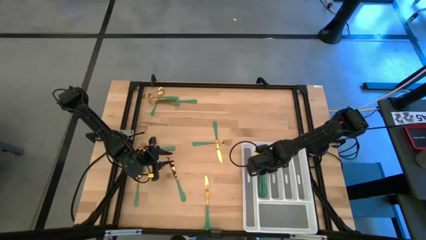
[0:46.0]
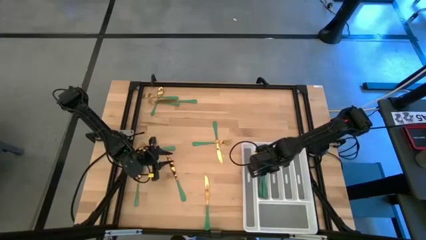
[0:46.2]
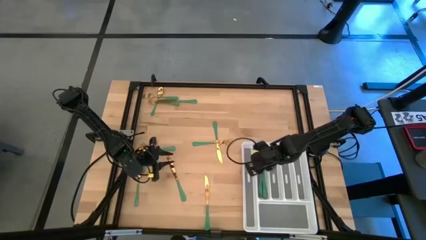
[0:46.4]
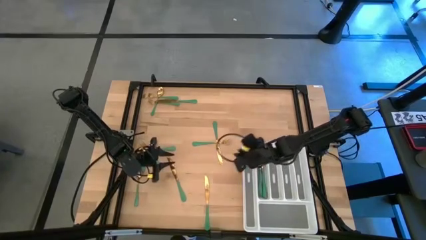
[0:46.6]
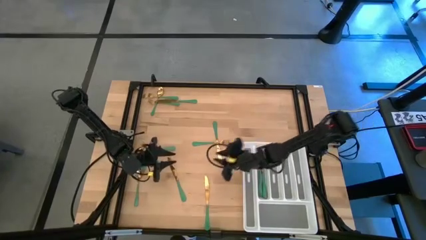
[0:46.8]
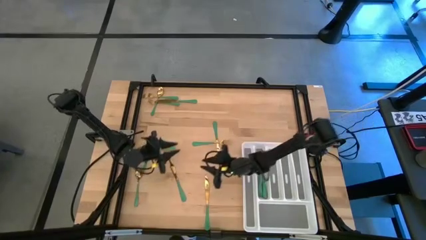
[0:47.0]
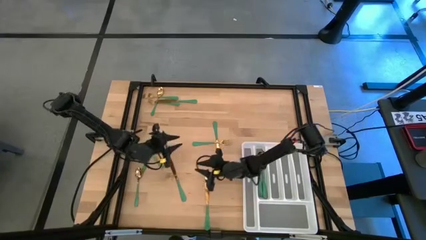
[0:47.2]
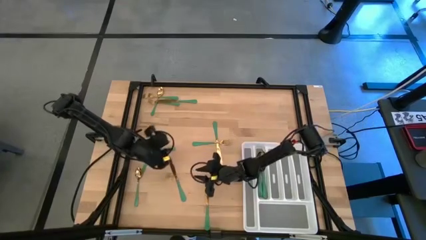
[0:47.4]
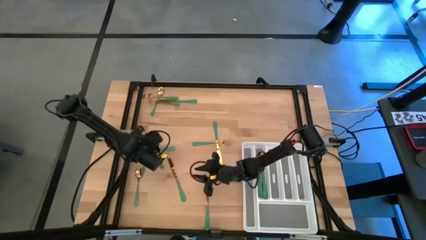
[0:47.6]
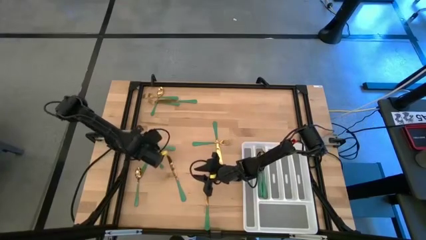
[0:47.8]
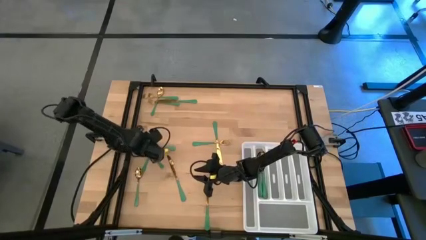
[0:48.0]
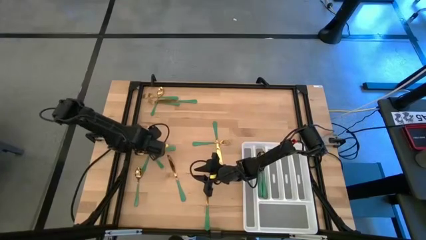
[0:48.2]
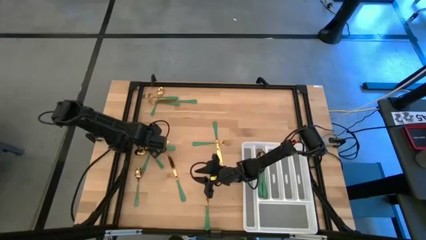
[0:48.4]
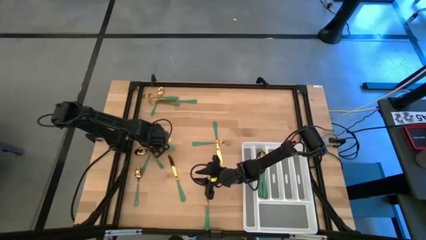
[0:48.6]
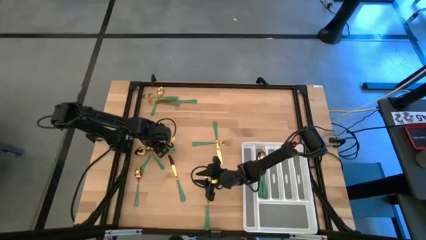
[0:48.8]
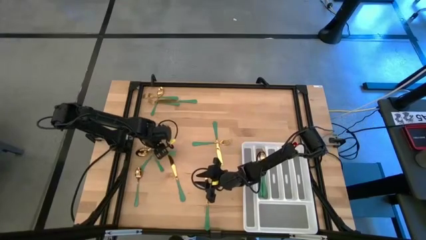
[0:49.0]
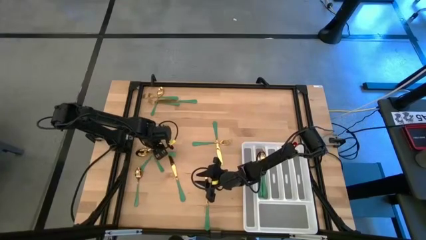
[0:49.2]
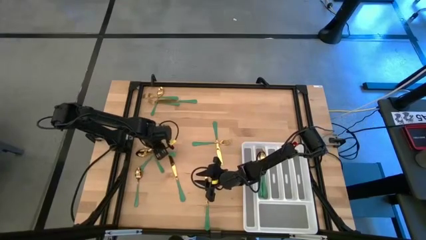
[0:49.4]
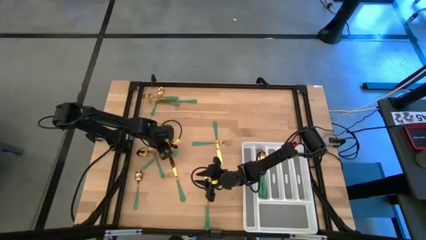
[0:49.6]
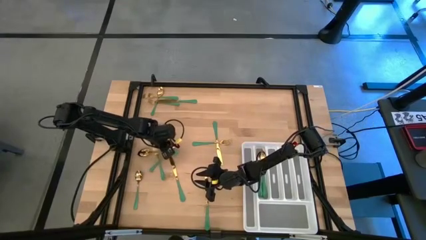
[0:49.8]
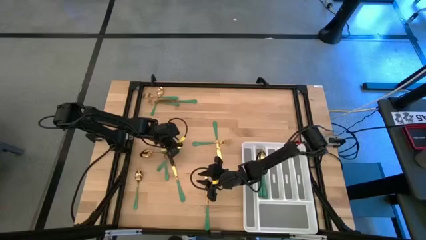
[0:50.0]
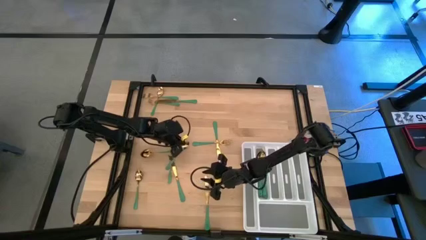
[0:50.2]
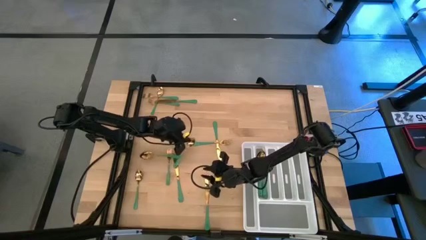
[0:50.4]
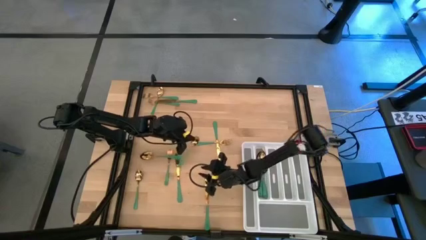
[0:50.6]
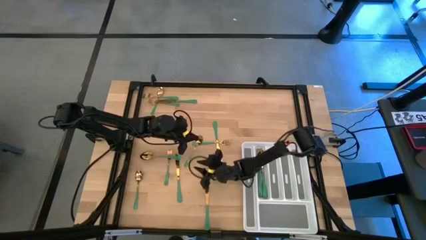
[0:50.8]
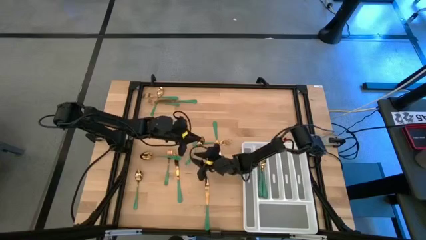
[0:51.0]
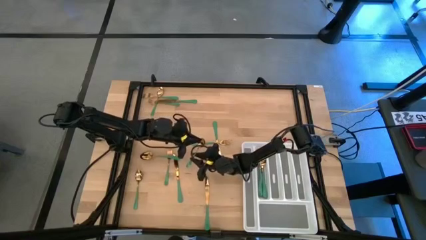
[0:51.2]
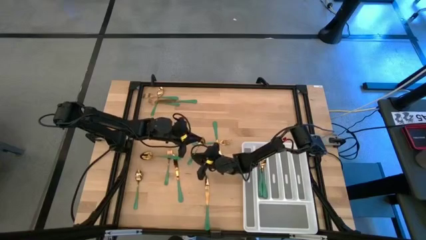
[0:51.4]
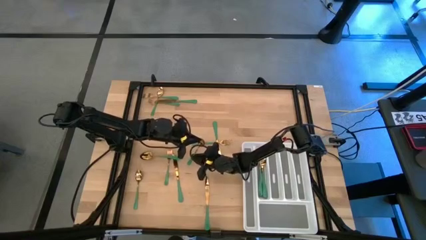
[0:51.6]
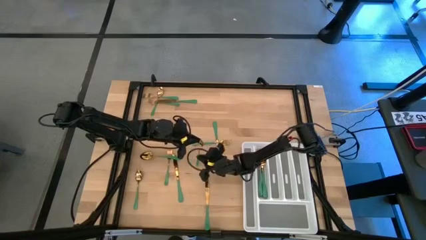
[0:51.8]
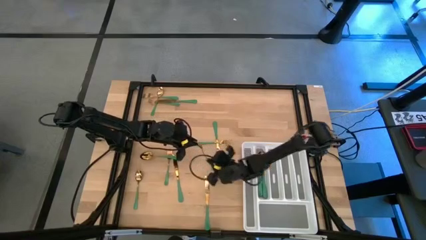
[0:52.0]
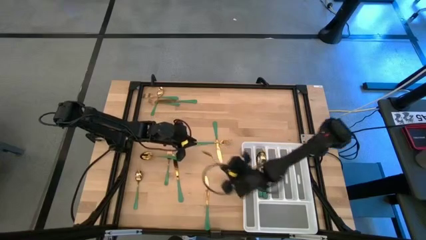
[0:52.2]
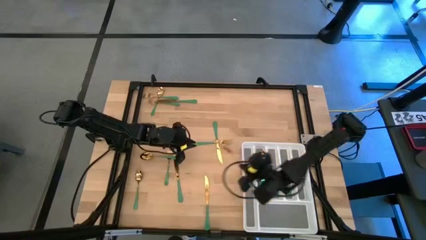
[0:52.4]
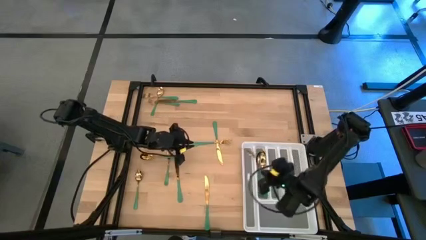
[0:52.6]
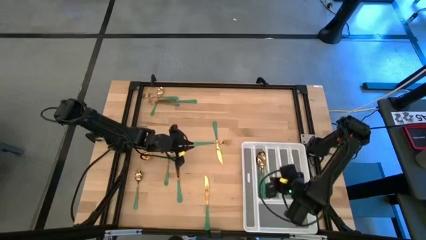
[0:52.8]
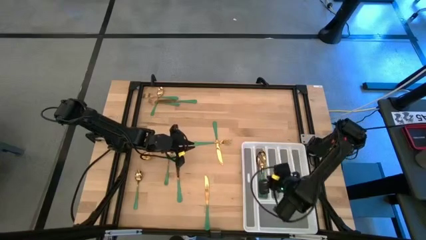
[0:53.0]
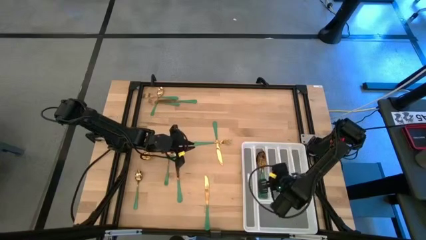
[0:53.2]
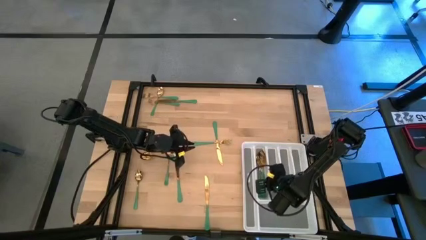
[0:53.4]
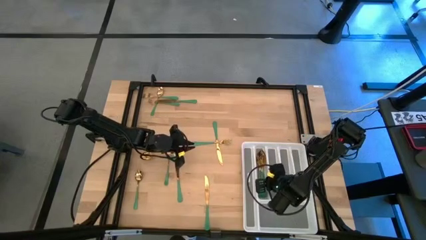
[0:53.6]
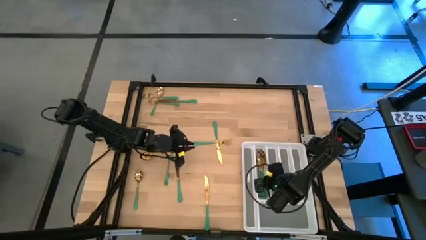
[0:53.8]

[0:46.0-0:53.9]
Task: Sort silverware
Put the middle left green spoon into the silverware rack

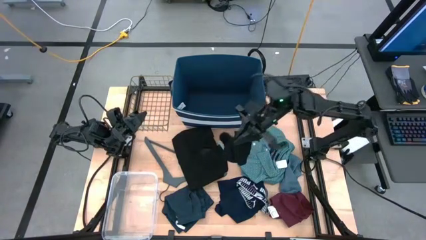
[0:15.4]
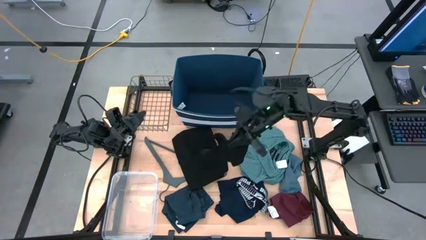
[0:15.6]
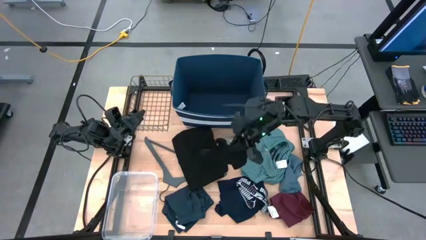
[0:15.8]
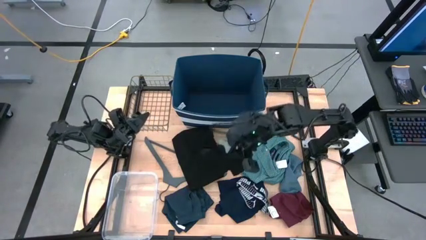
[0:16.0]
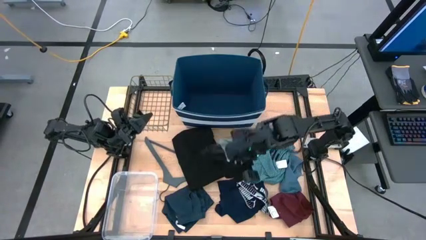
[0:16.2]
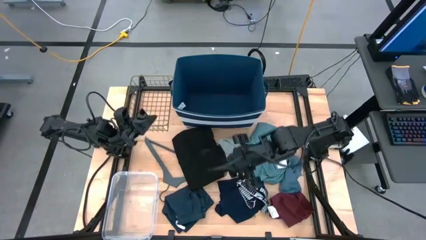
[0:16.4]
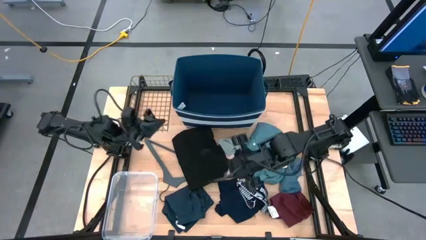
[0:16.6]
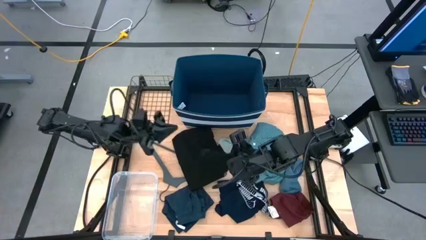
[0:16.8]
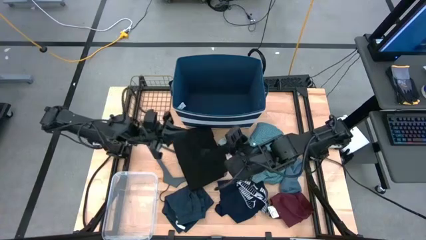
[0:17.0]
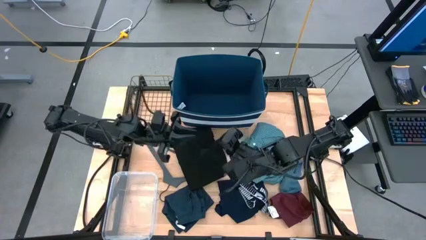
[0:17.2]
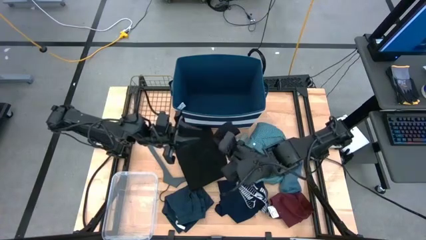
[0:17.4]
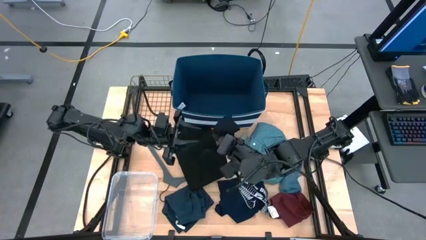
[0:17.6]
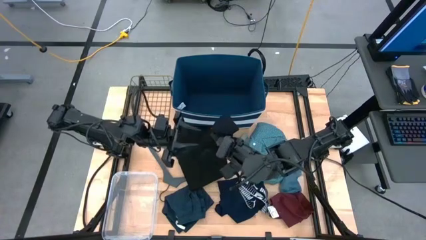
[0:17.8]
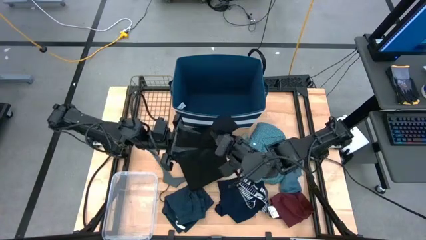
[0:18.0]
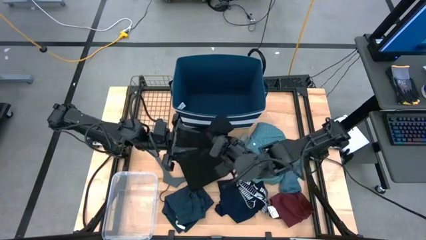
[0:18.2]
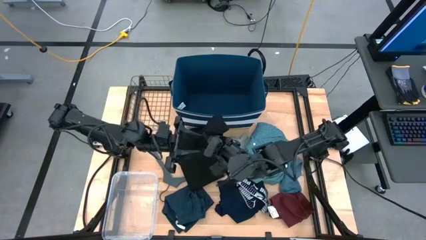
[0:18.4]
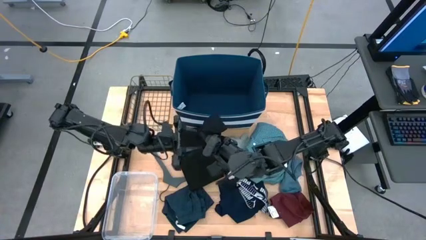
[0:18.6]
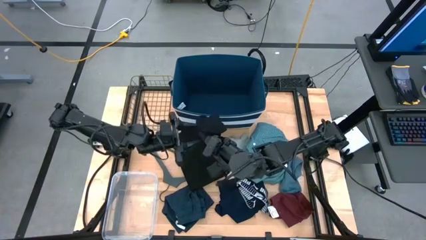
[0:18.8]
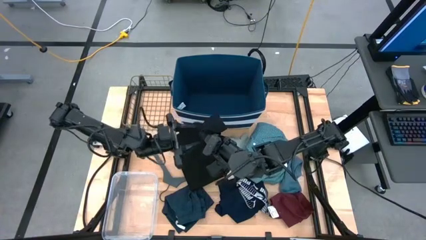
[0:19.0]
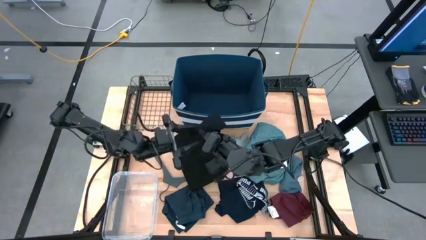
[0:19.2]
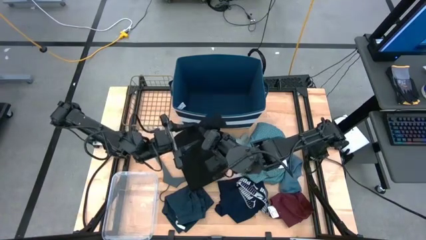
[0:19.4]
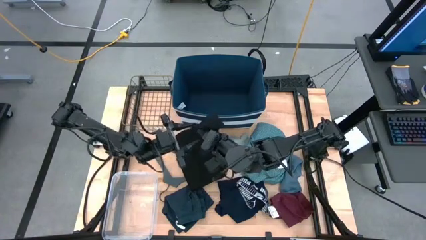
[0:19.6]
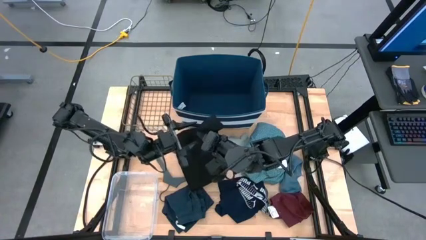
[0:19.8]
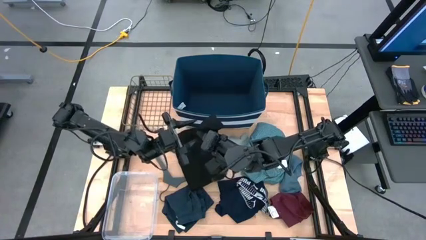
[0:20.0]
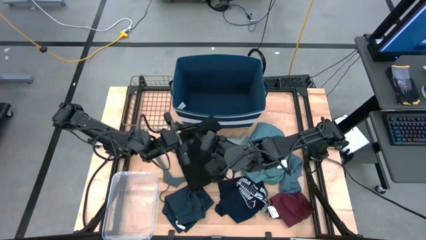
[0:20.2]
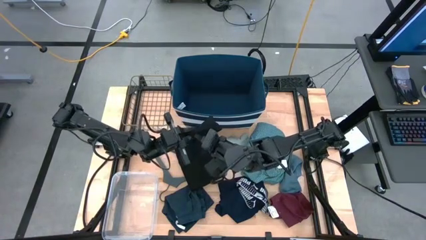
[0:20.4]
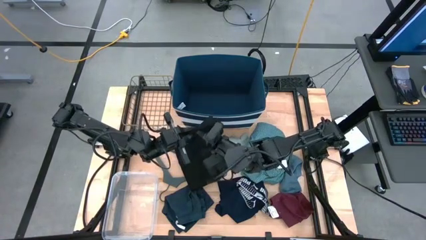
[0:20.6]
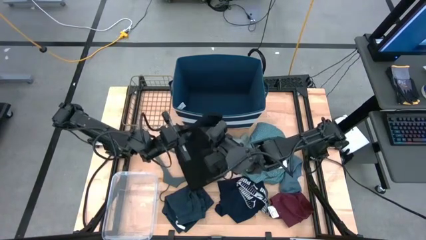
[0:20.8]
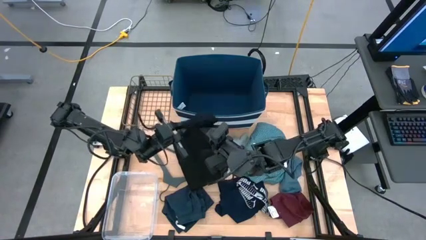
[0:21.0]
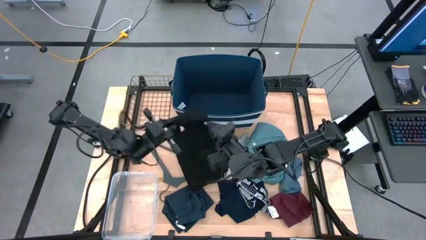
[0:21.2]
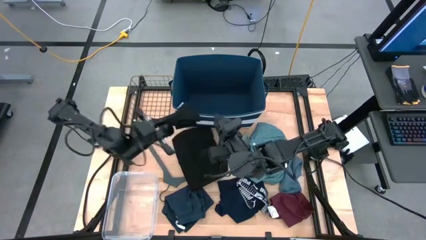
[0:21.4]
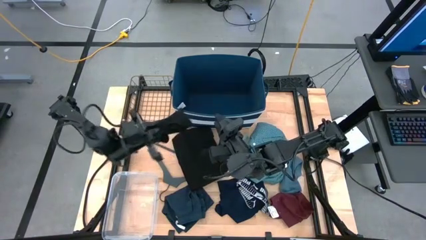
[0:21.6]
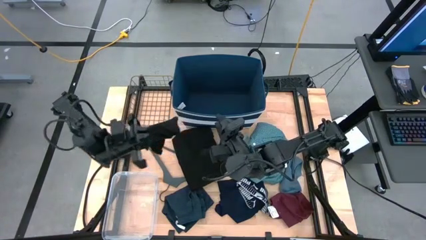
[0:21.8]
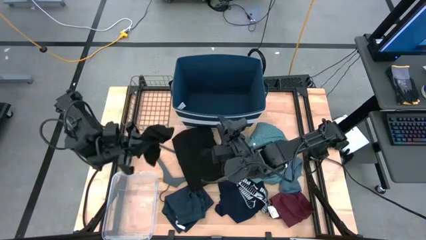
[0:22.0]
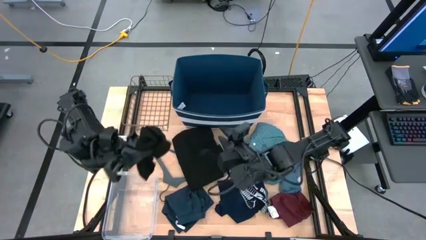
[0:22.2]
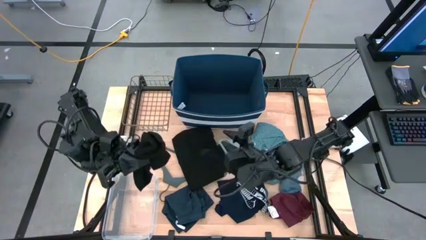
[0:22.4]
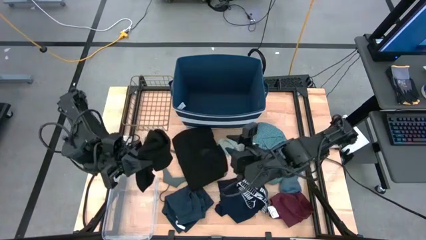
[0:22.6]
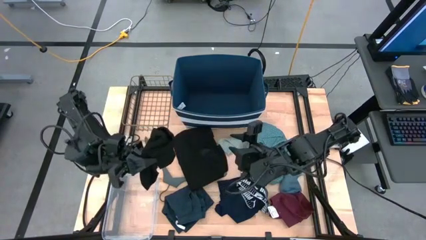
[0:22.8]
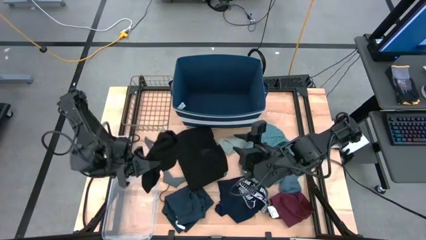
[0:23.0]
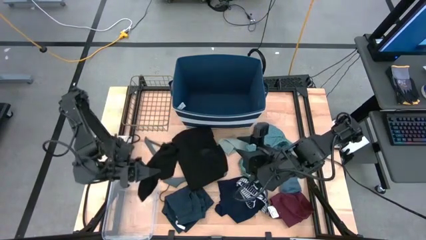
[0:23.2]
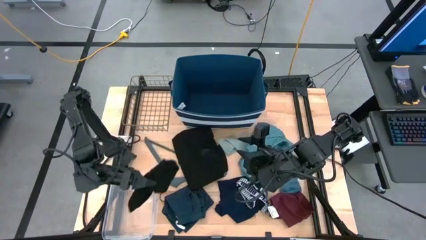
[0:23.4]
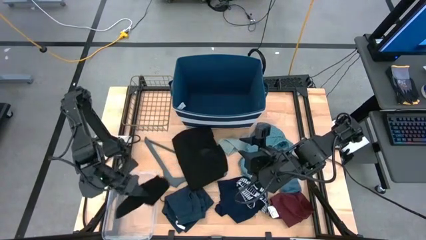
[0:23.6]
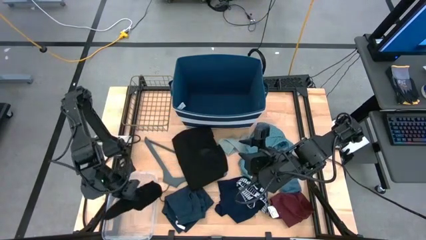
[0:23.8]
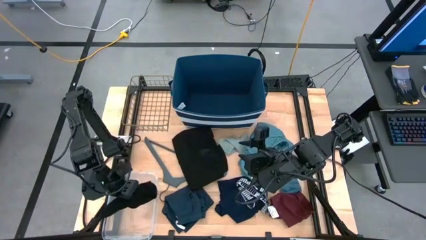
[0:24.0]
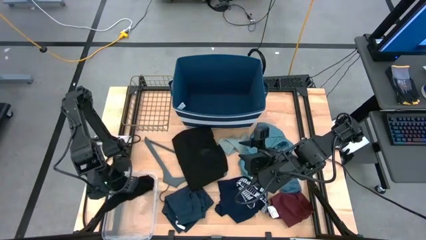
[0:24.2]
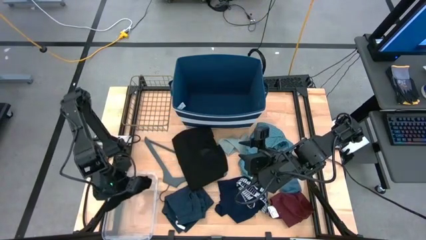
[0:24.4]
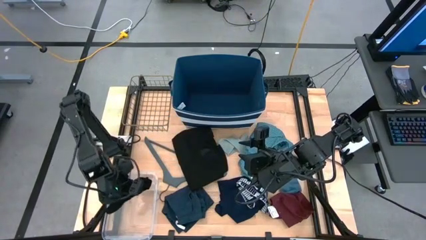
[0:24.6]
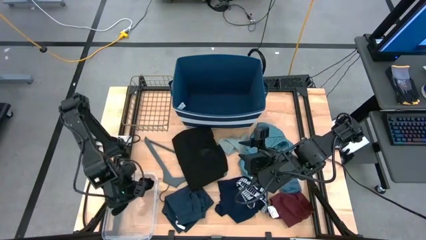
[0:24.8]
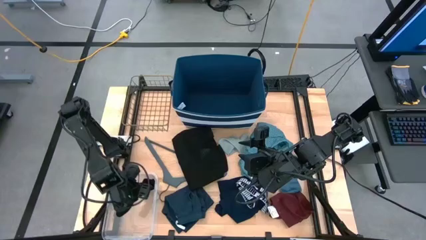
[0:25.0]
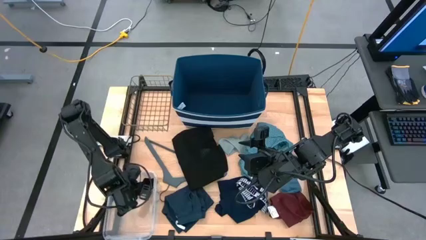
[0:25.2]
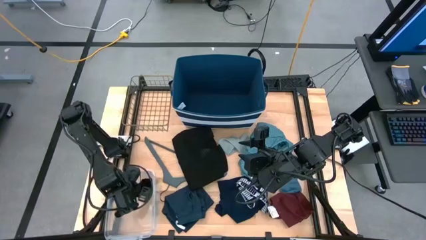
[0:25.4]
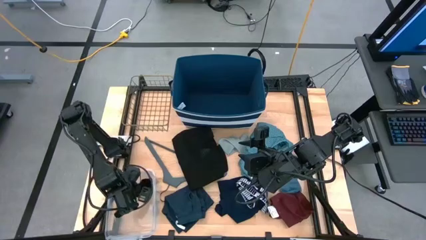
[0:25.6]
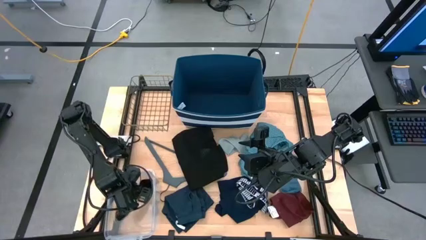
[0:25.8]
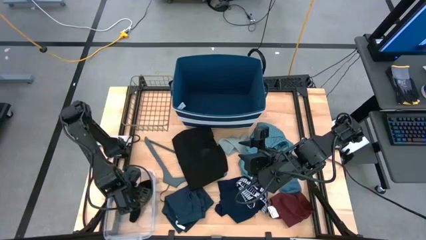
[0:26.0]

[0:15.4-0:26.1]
Task: Pick & Place Cloths
Put the black sock into the transparent container
